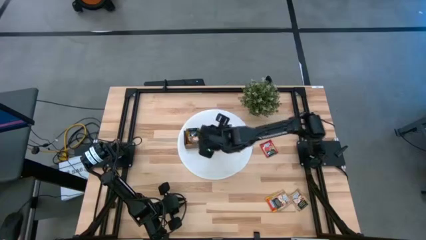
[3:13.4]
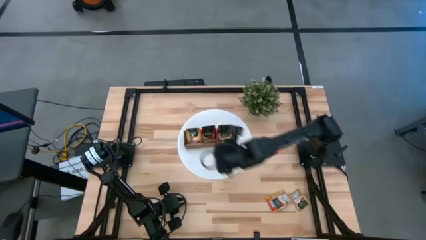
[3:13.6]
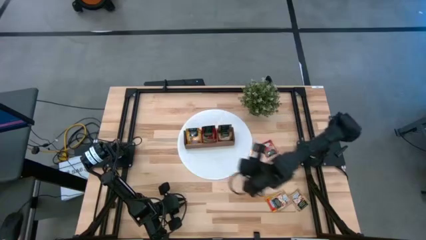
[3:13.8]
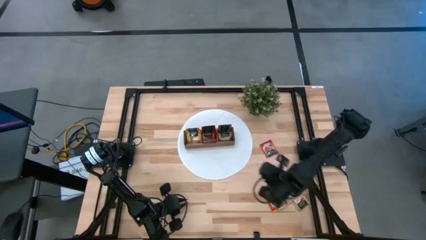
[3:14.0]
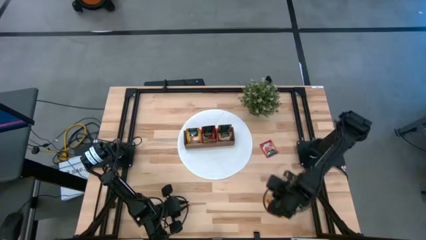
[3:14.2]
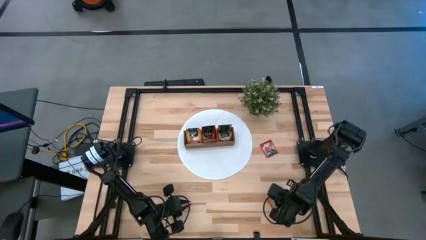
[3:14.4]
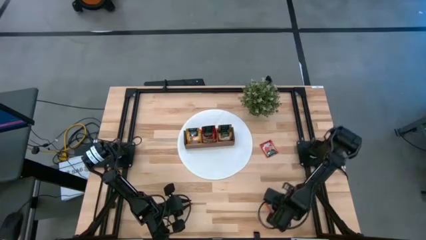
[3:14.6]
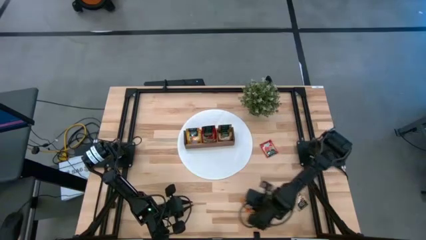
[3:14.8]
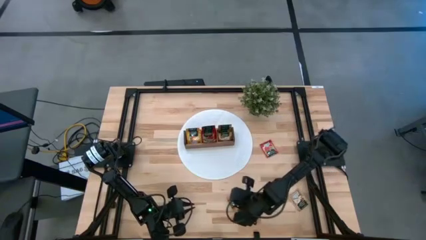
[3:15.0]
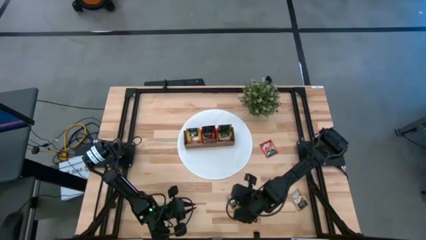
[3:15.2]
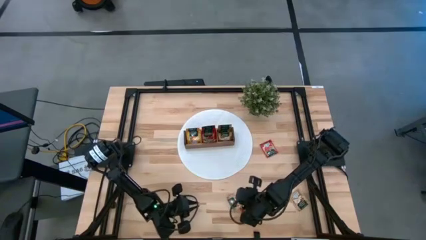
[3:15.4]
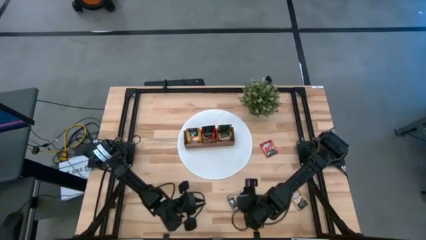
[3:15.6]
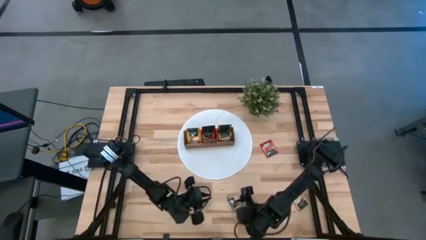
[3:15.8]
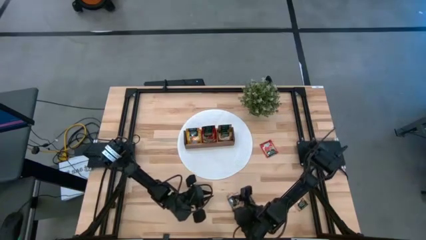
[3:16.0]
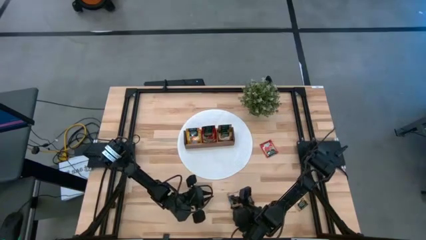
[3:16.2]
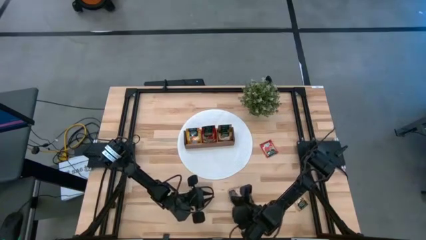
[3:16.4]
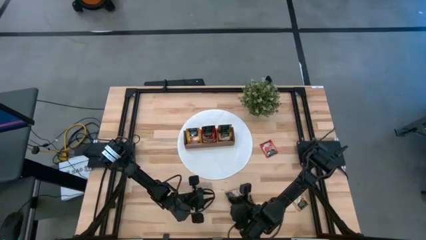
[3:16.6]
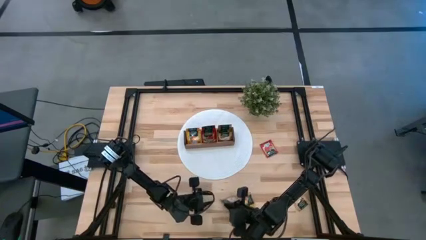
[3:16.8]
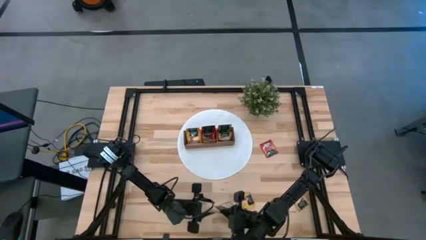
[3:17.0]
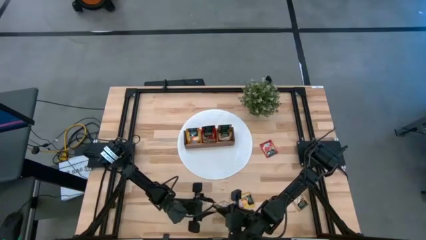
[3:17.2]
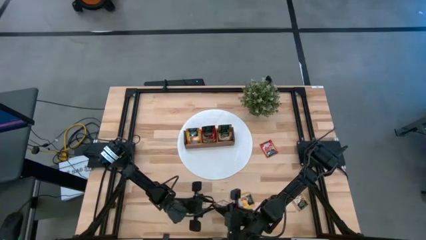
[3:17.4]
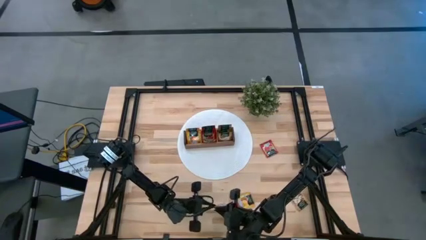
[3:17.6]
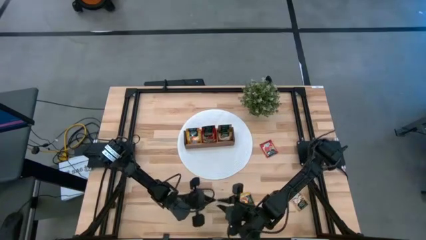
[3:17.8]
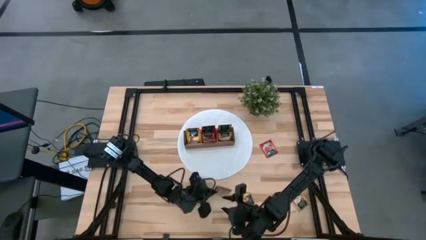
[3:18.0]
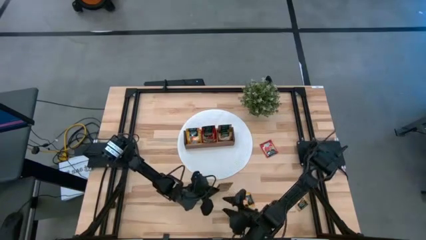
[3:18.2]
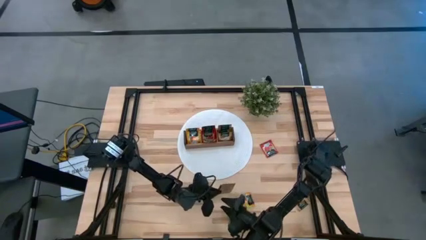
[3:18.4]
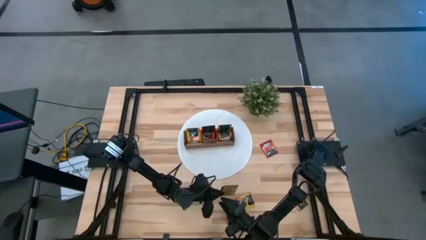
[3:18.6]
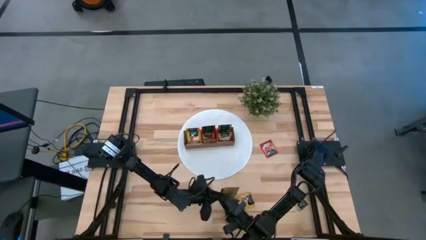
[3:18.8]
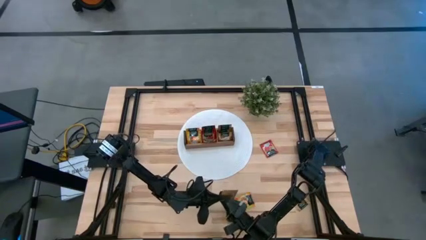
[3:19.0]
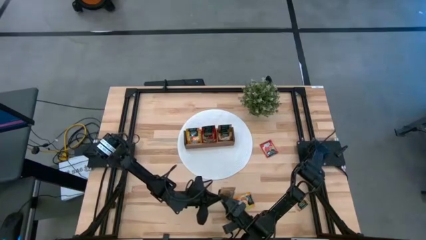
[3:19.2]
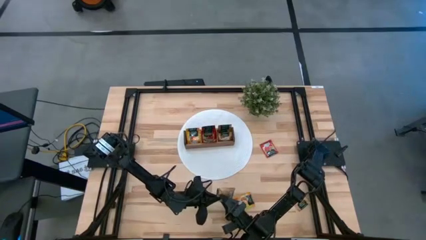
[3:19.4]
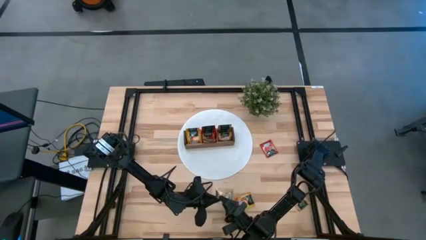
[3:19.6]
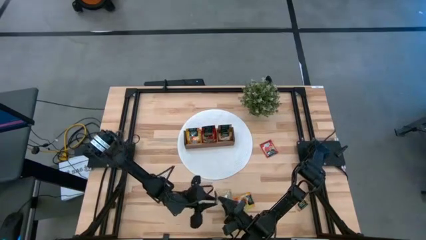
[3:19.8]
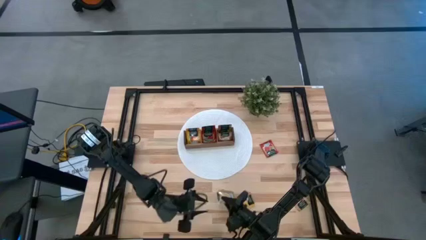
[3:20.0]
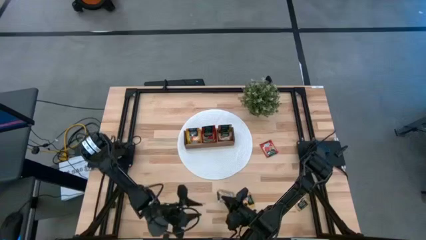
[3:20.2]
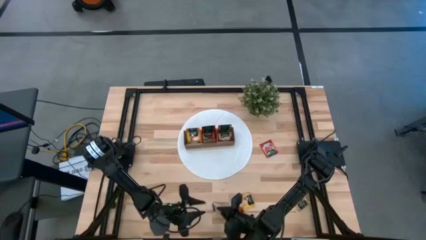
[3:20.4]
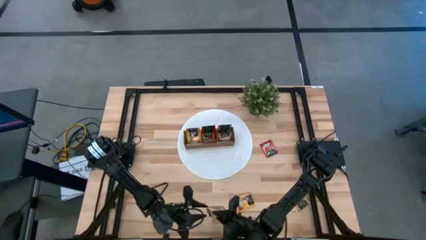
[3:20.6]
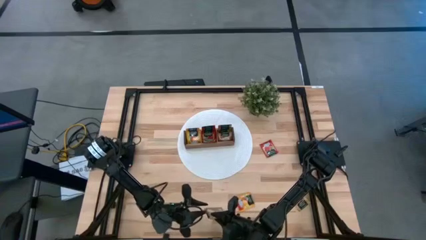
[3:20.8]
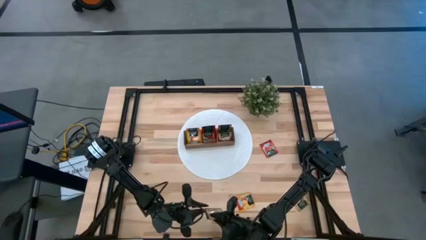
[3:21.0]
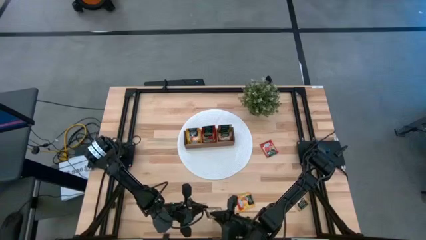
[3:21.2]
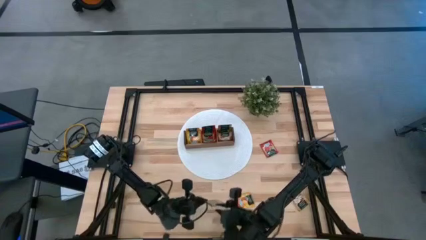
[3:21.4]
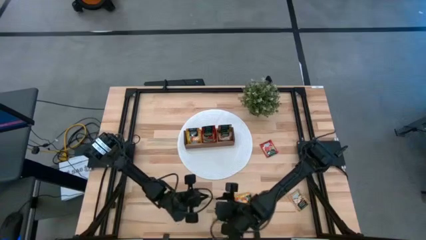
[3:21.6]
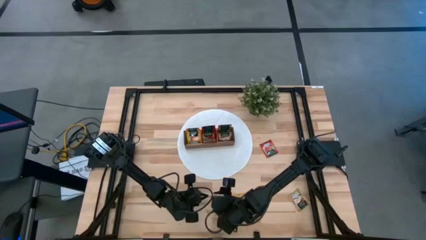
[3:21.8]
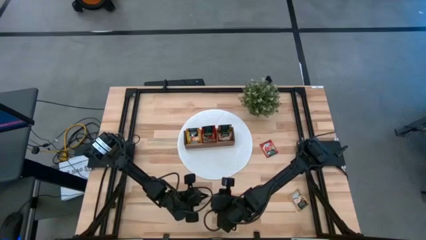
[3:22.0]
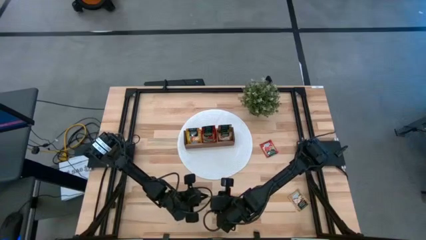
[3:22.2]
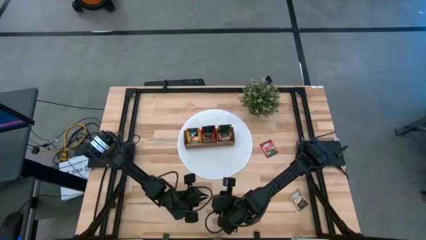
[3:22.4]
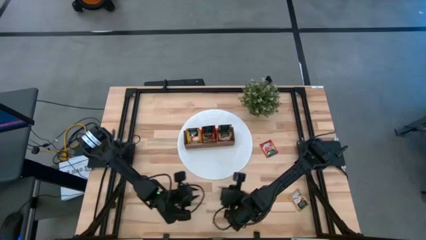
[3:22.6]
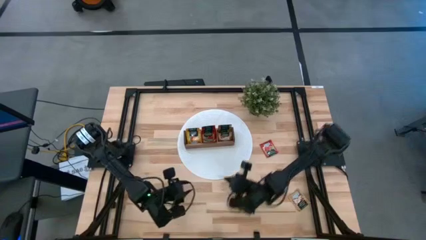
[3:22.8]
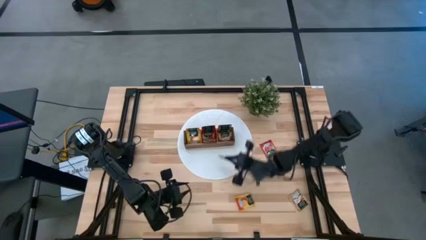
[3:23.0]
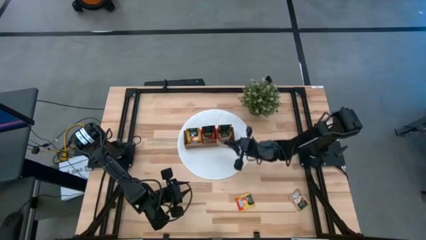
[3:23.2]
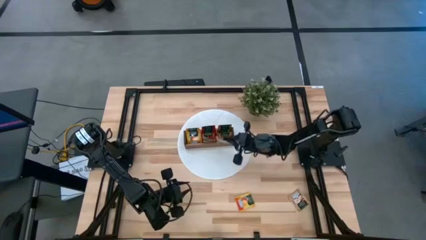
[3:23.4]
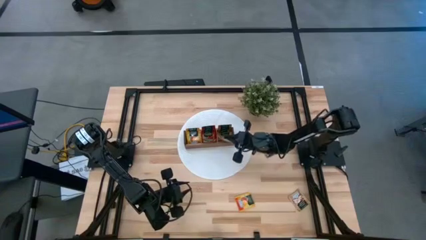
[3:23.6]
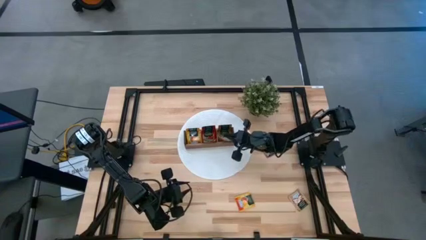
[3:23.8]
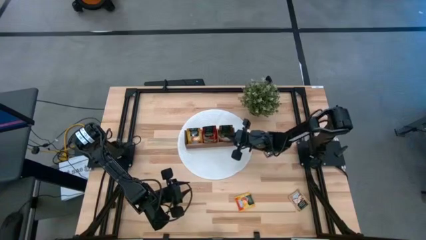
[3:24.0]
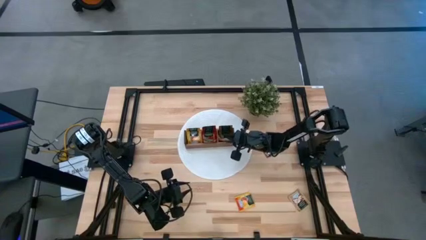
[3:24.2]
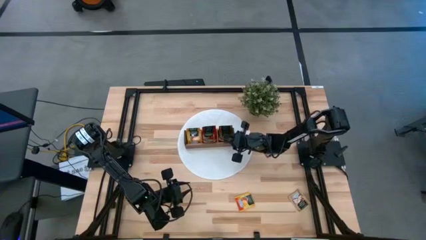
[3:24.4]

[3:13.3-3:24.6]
Task: Pick & Place Tea
Put the brown tea bag into the right section of the wooden organizer

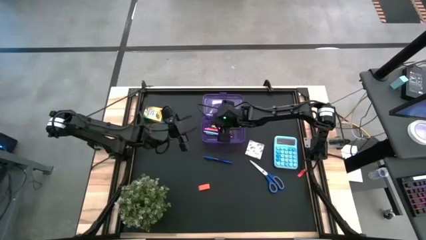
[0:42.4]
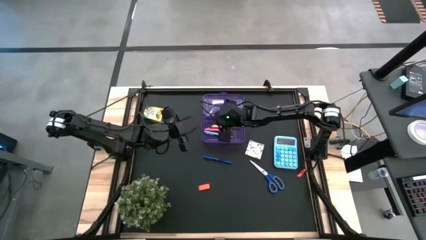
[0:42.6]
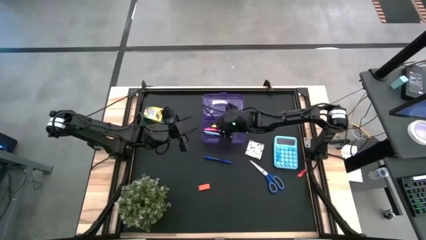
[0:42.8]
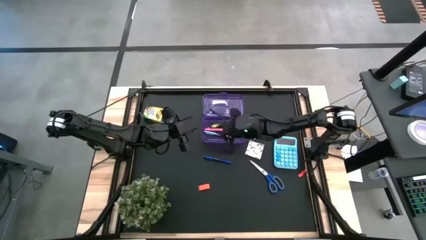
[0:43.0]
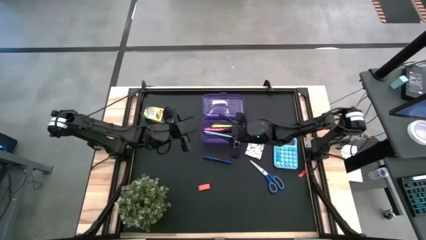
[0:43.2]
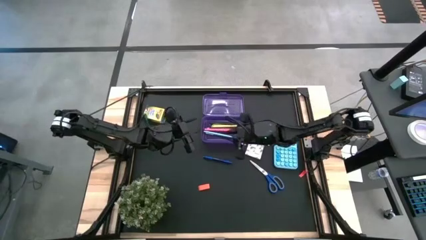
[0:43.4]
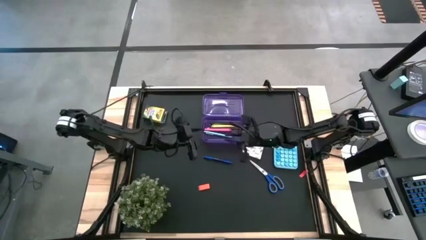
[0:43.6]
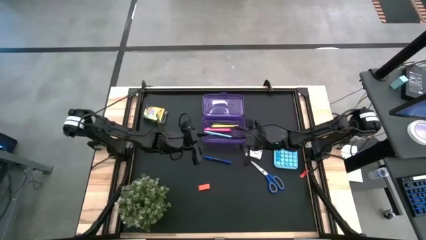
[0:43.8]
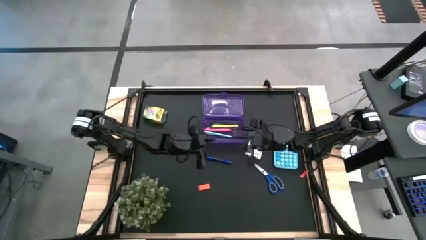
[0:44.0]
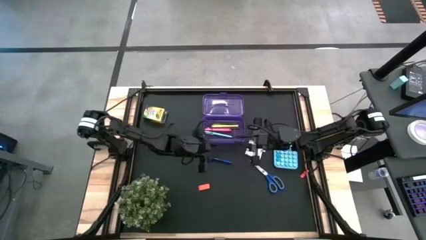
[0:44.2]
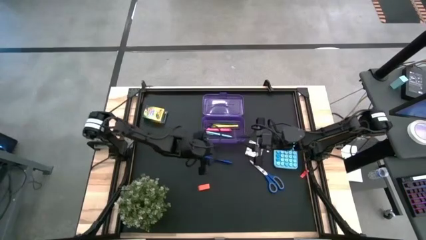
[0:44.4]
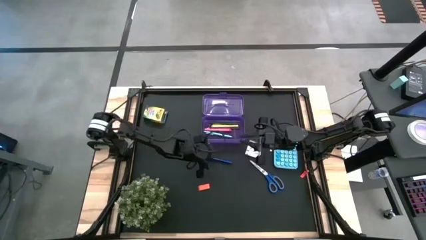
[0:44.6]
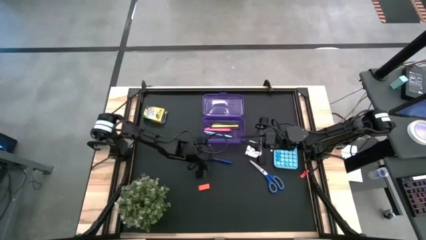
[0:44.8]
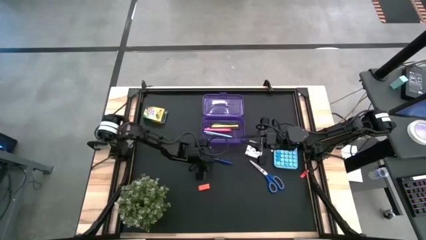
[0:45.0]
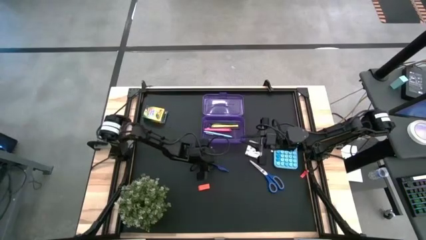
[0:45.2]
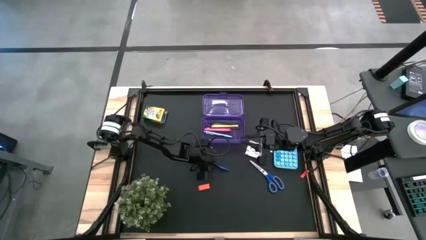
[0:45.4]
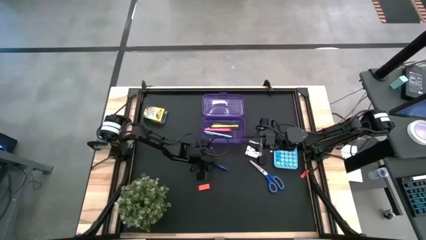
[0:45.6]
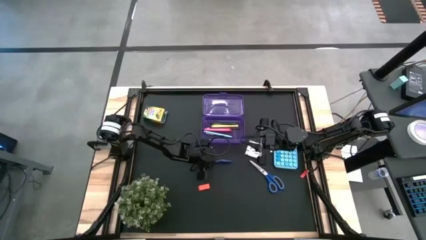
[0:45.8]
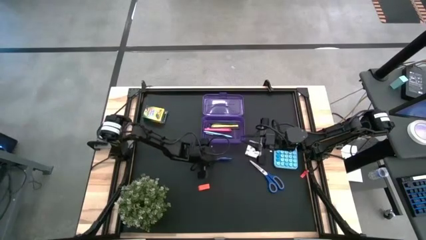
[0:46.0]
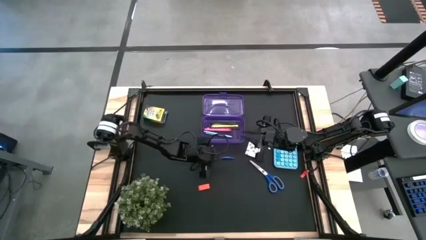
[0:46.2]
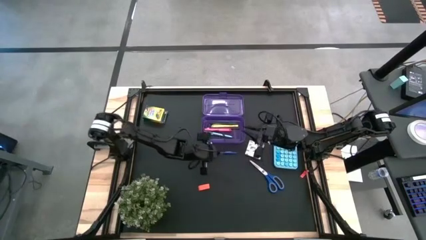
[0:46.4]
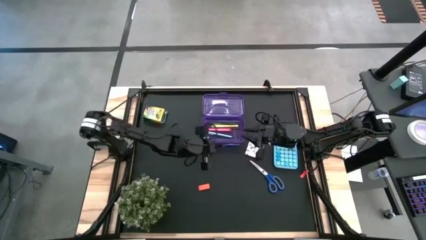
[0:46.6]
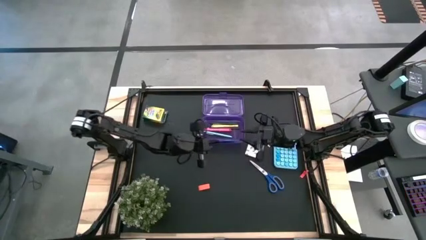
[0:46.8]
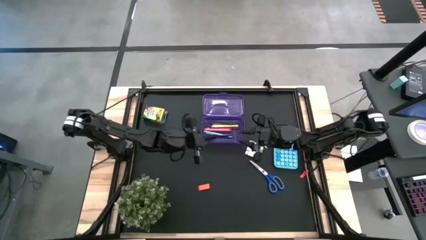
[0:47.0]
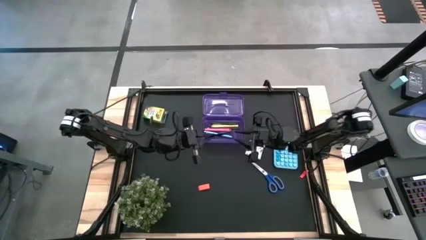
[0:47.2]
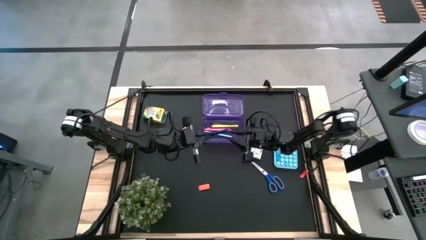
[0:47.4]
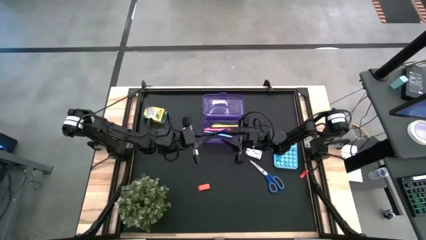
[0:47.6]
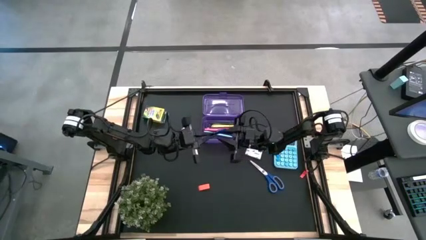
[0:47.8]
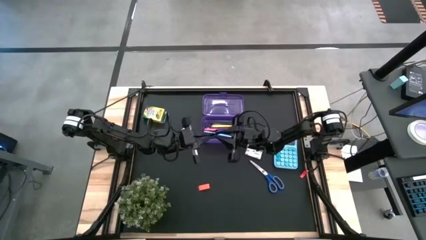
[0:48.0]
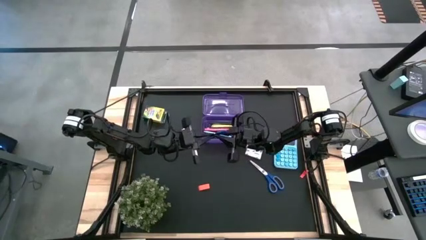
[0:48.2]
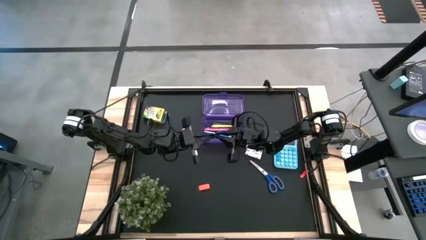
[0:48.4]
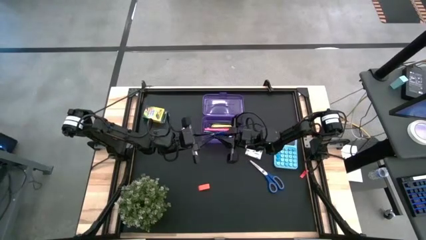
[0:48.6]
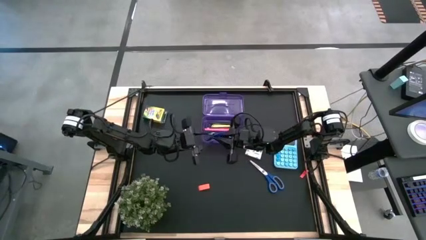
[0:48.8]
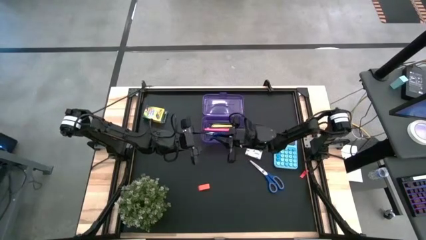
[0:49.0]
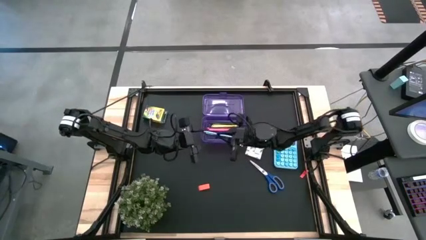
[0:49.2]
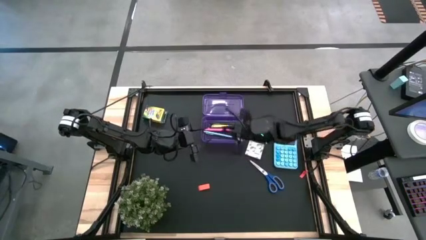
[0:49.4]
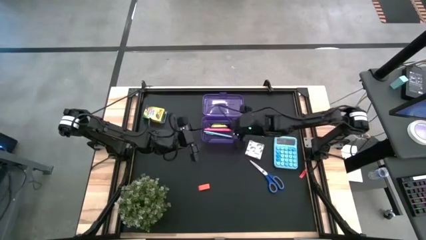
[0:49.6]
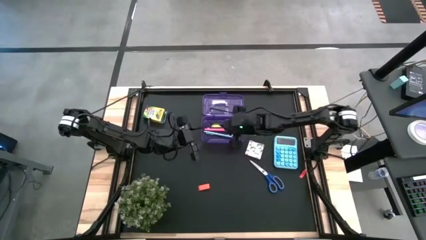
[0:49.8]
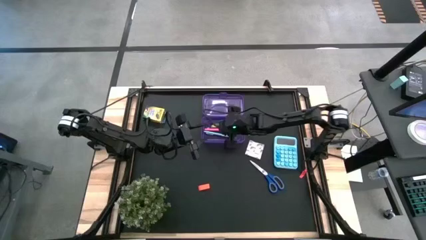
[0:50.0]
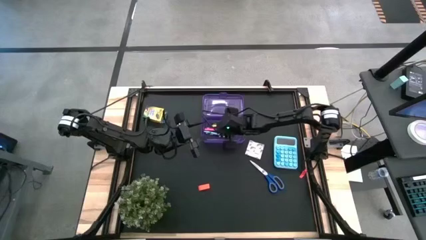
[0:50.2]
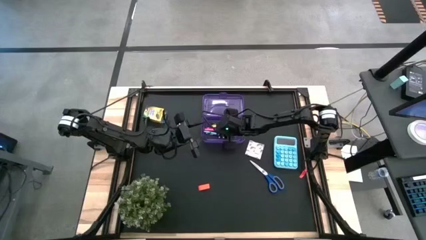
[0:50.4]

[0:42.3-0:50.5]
Task: Pack school essentials
Put the blue pen into the purple box
